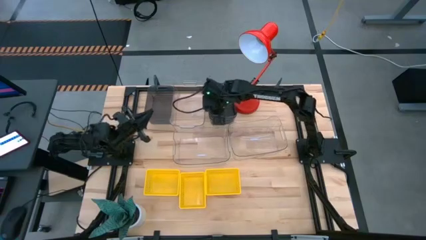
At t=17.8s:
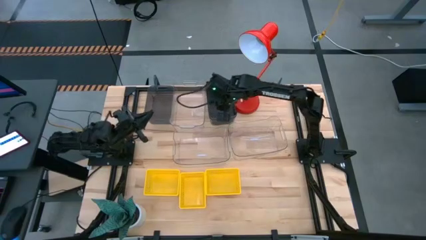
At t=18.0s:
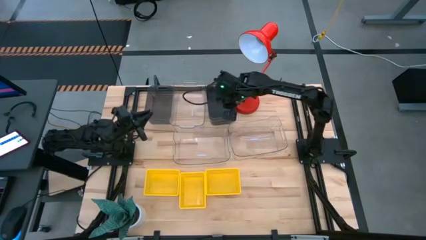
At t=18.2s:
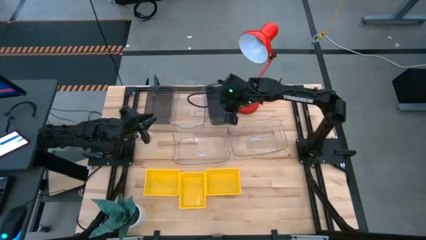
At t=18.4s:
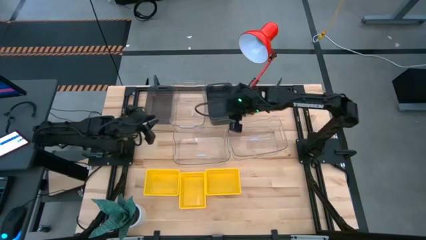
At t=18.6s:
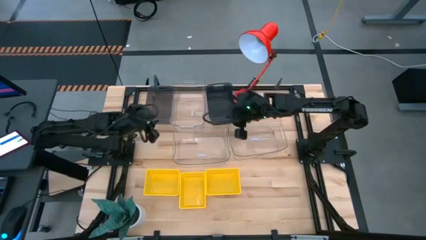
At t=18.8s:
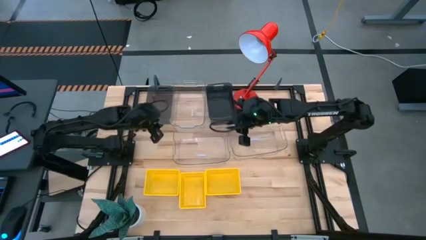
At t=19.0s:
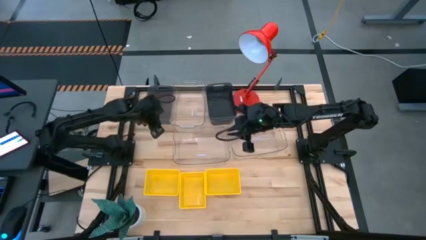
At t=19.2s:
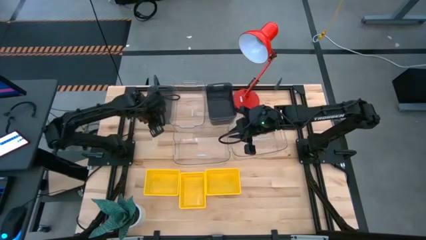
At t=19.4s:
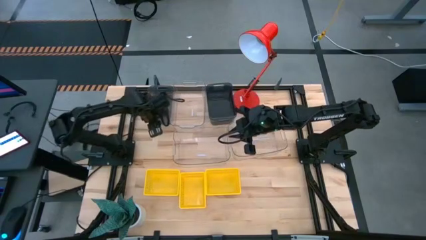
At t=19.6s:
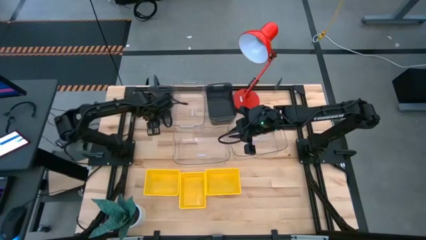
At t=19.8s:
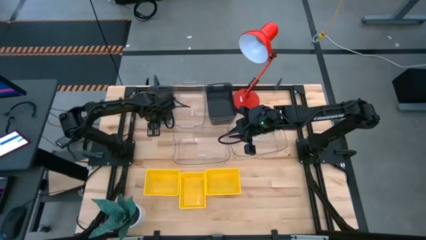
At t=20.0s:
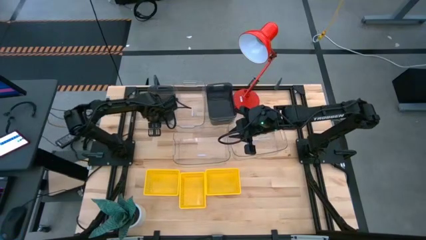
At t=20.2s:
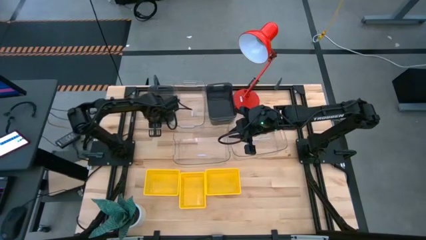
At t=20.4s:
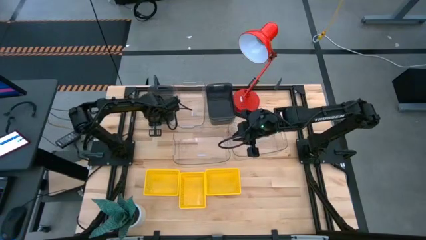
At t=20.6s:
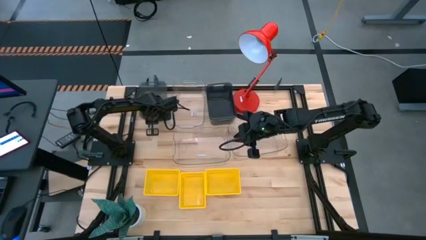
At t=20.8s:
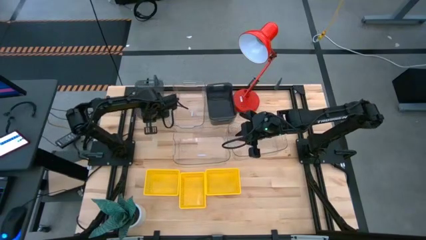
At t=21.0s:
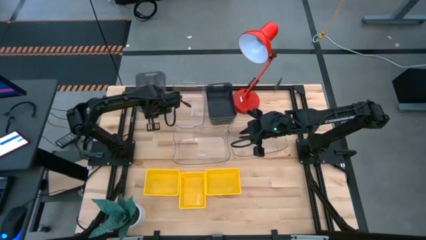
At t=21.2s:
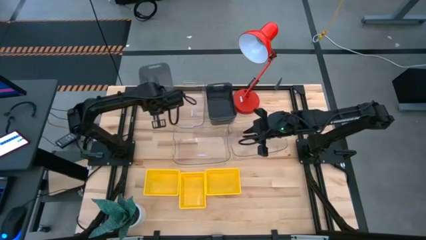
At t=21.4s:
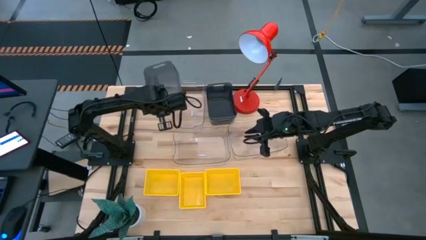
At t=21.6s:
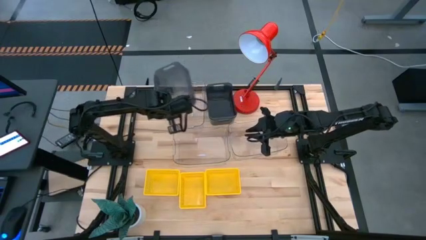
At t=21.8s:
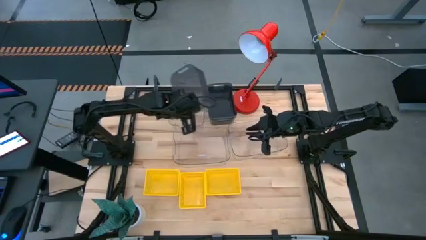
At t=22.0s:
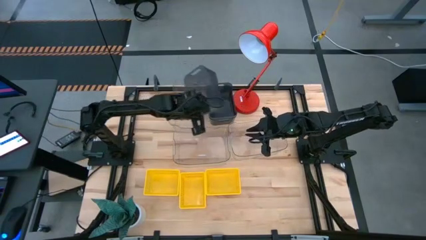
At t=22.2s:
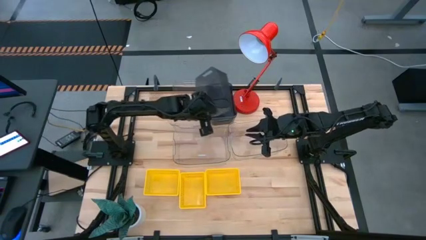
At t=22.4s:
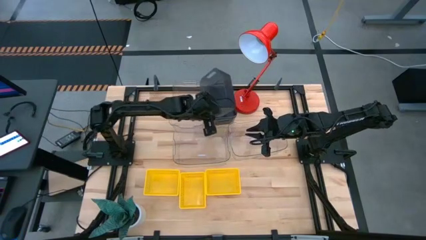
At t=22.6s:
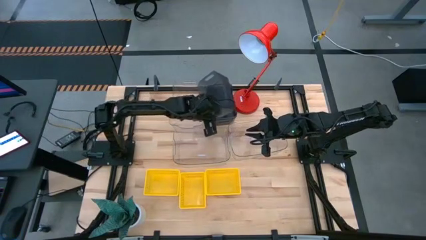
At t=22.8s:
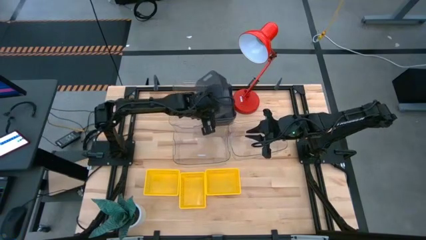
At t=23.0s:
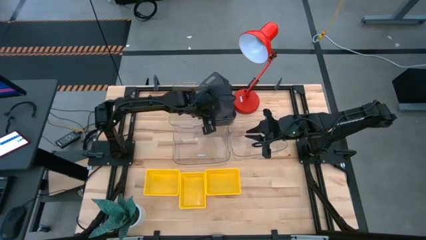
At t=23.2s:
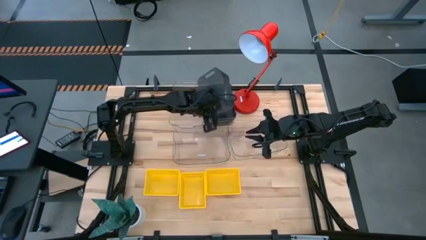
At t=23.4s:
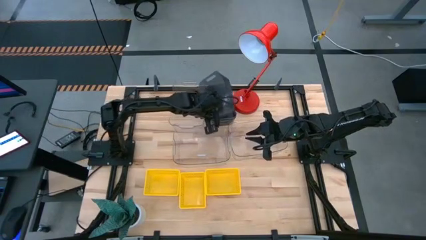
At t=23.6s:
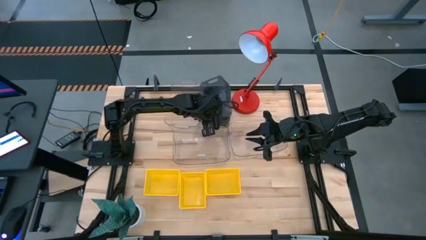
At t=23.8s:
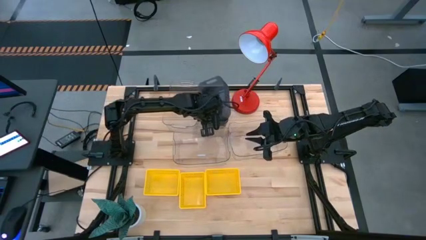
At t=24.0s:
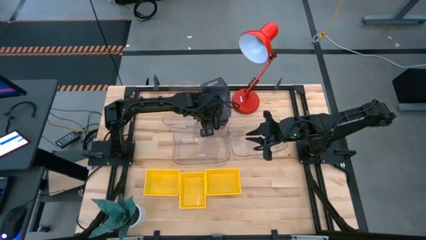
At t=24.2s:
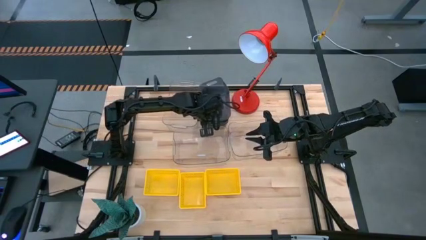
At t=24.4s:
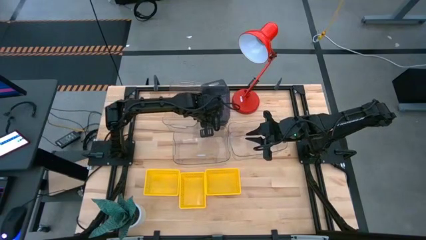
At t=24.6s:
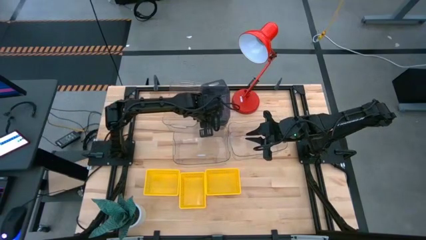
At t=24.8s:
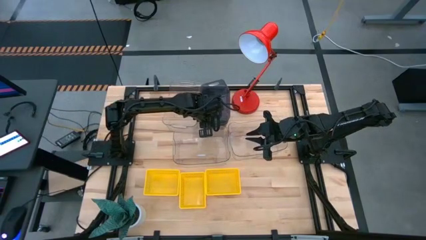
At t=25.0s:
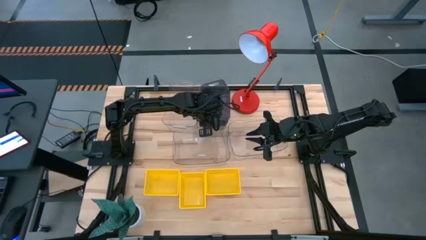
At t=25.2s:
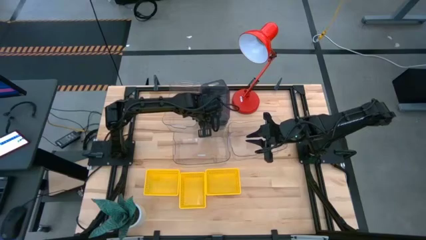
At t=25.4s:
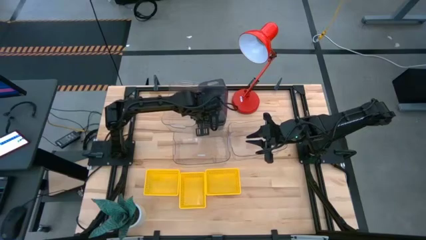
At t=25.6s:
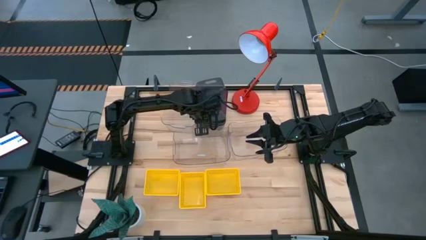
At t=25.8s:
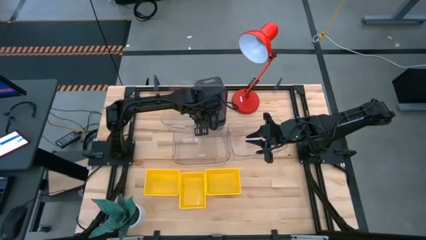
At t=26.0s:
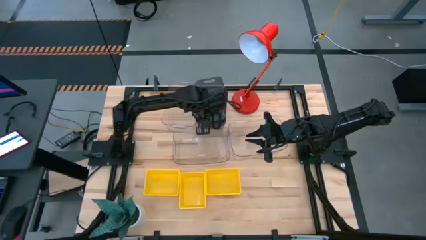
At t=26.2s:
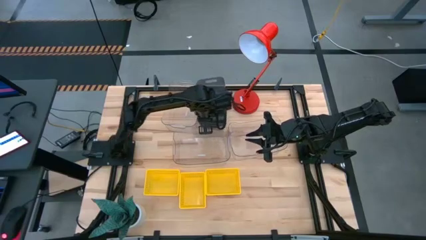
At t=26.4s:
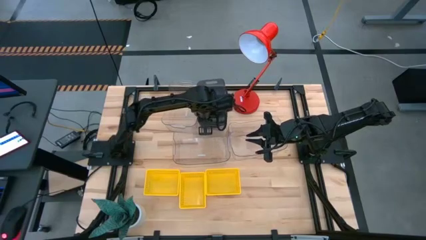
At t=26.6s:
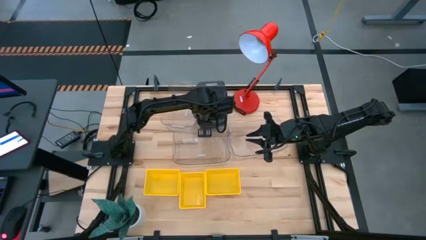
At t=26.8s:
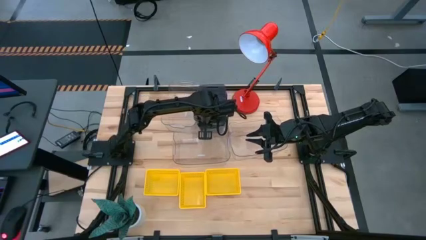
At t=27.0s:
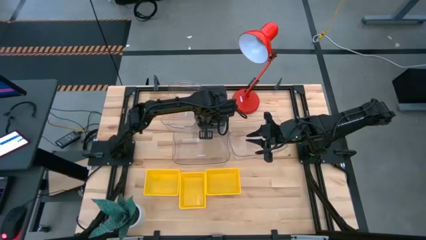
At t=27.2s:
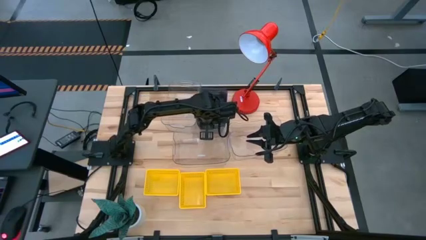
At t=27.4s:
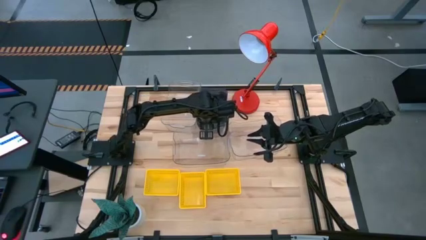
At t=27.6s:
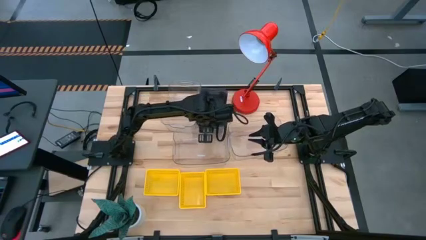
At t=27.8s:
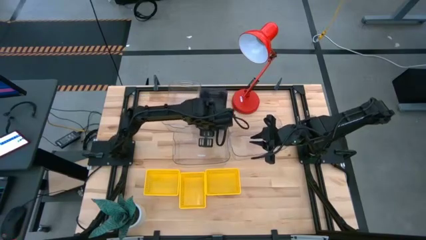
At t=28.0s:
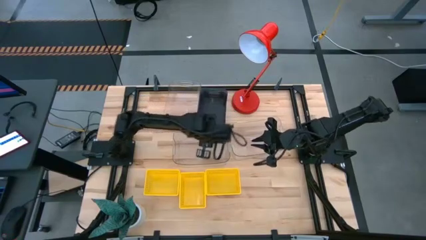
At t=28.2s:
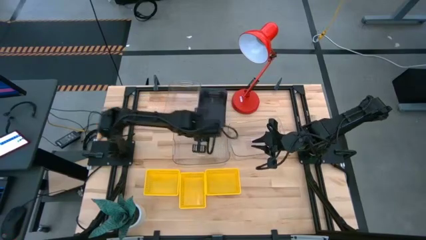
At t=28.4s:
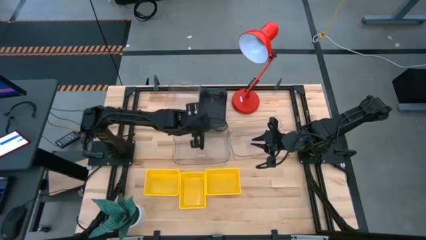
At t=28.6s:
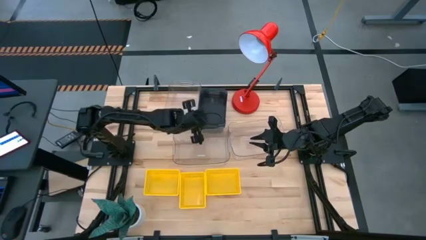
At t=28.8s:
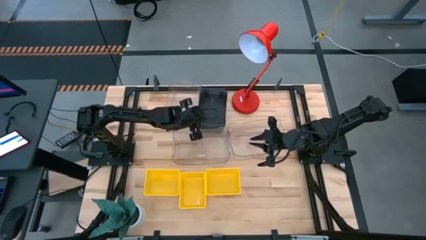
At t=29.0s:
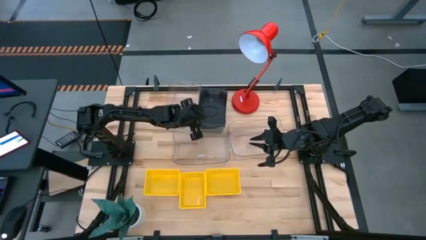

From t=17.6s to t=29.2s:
Stack the left black bin on the black bins

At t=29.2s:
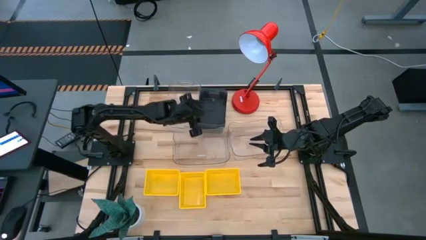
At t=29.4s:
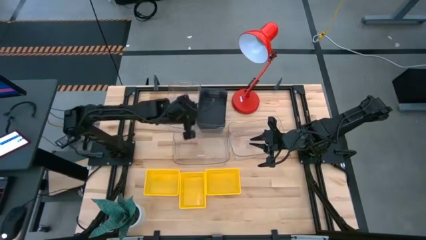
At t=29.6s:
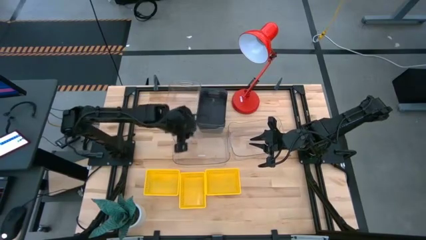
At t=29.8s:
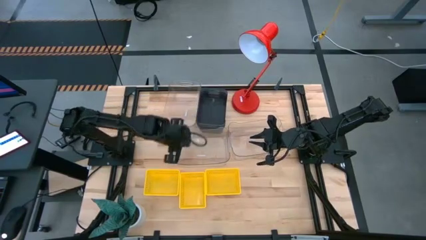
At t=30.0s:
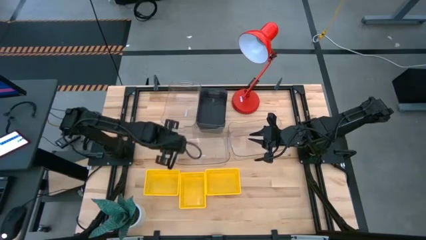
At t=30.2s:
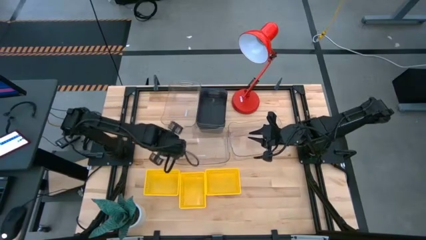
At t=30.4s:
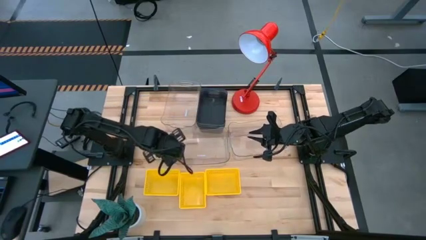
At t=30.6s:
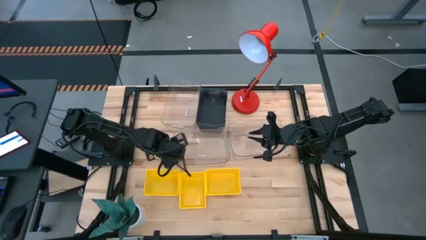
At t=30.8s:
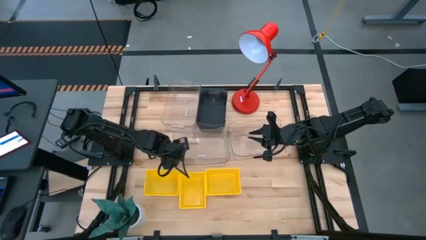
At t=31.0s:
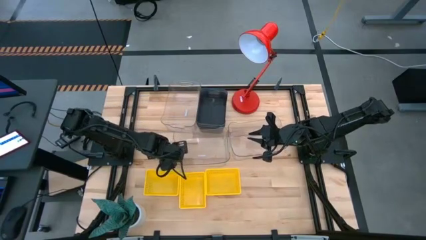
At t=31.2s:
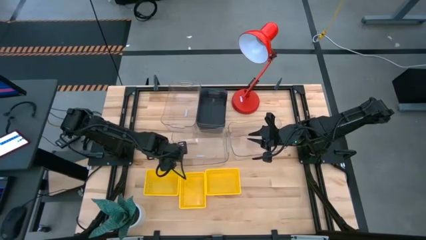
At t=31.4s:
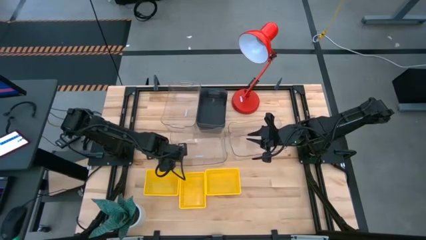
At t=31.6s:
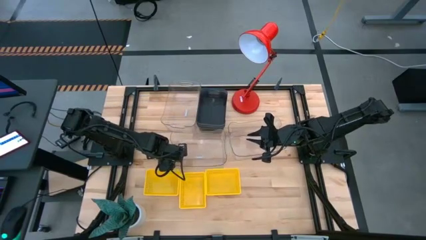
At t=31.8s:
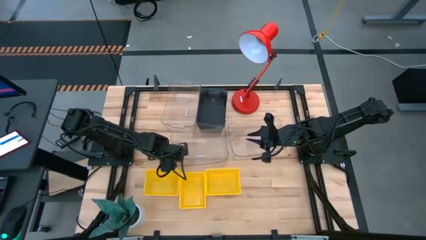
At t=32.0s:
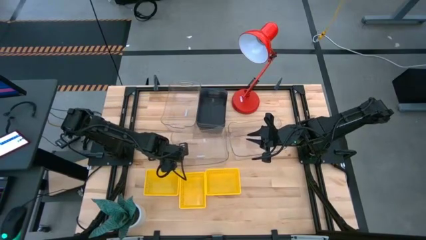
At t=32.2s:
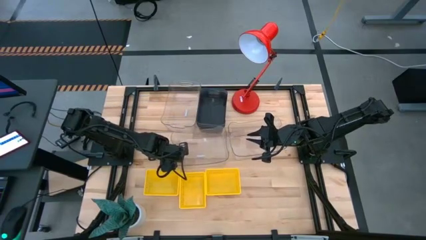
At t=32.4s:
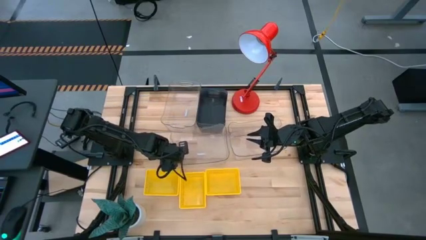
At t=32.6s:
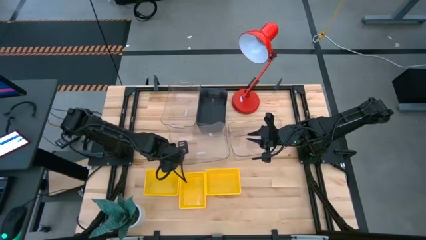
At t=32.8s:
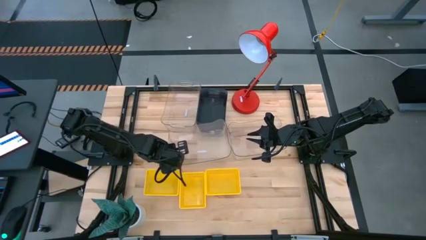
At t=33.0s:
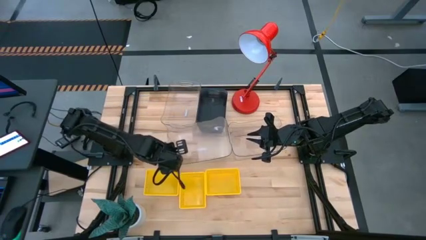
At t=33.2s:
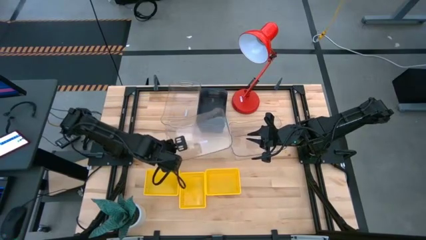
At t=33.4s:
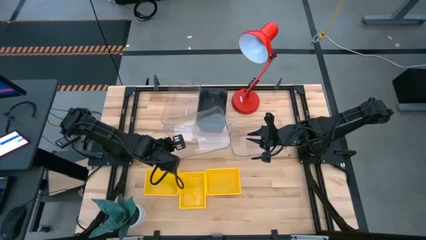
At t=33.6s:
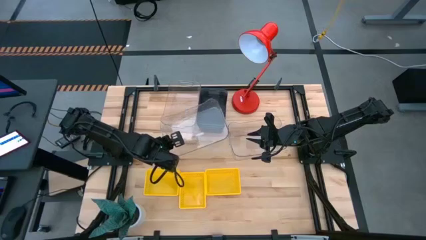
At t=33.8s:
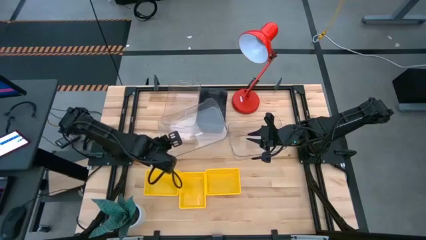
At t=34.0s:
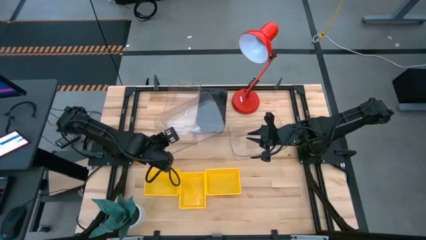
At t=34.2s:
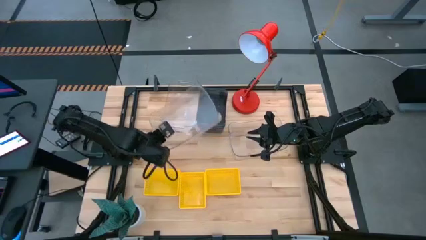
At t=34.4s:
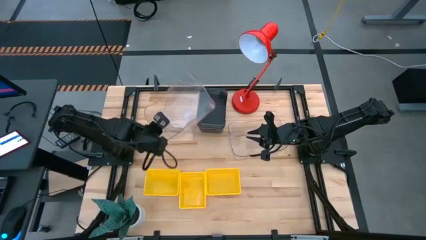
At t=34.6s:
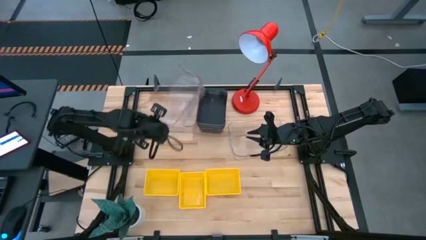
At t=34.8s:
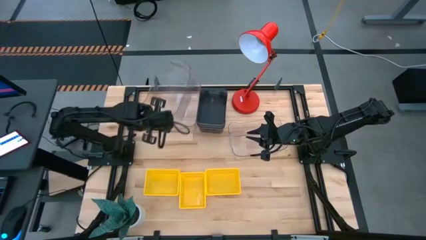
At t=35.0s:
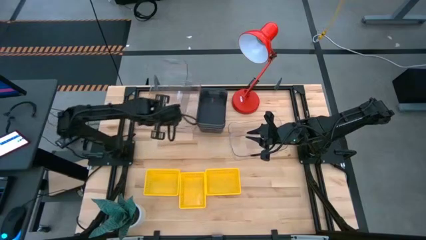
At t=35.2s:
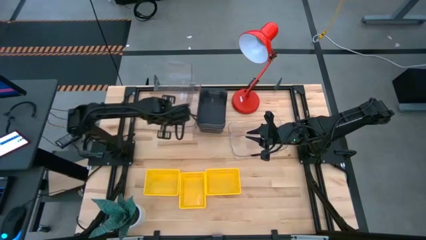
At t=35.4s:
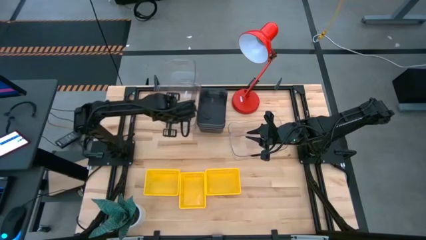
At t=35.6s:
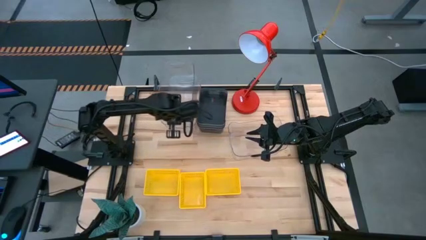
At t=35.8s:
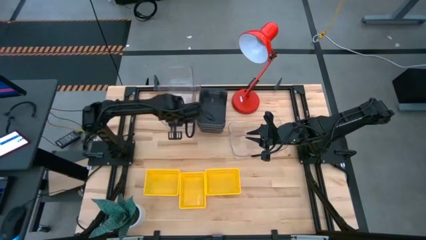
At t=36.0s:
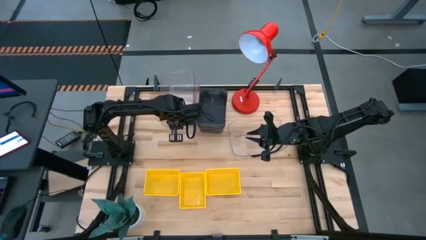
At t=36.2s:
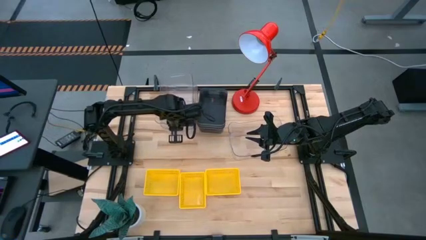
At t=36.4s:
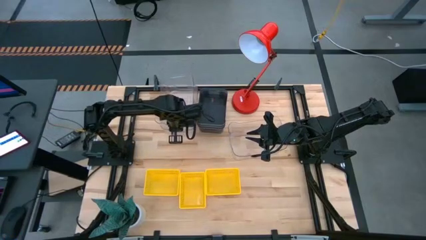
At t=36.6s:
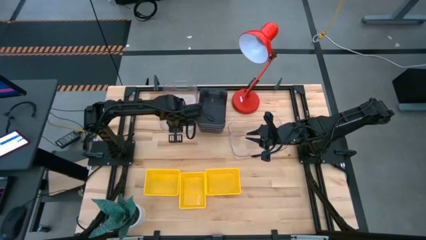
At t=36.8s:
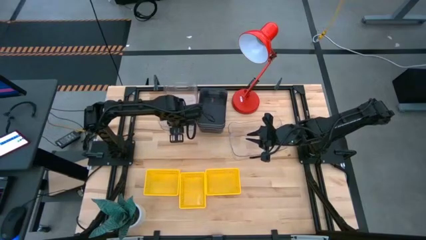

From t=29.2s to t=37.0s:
Stack the bottom left transparent bin on the top transparent bin
